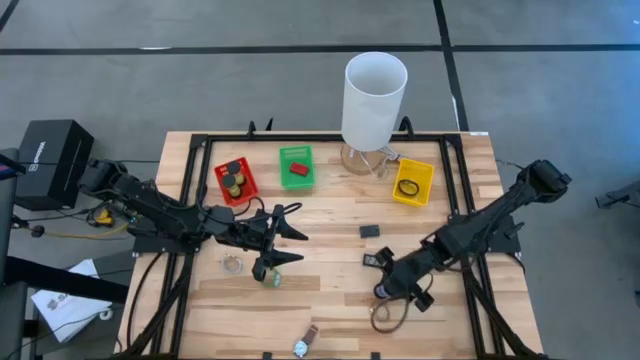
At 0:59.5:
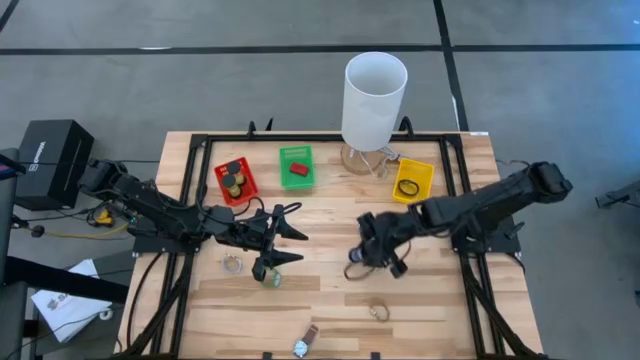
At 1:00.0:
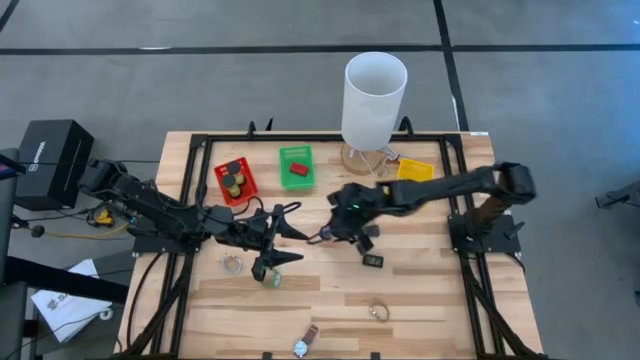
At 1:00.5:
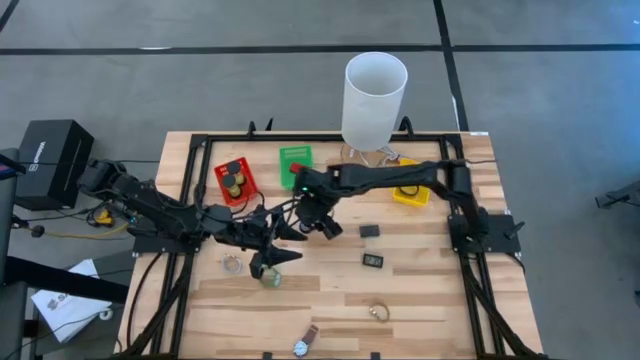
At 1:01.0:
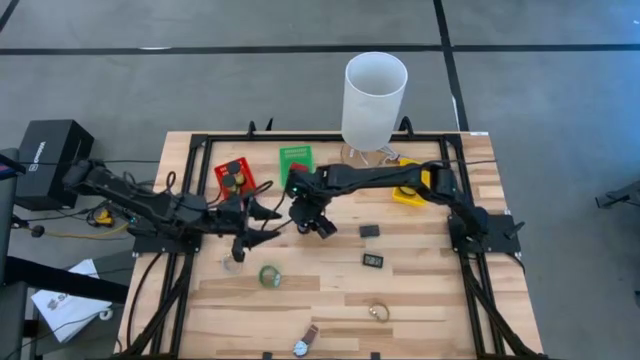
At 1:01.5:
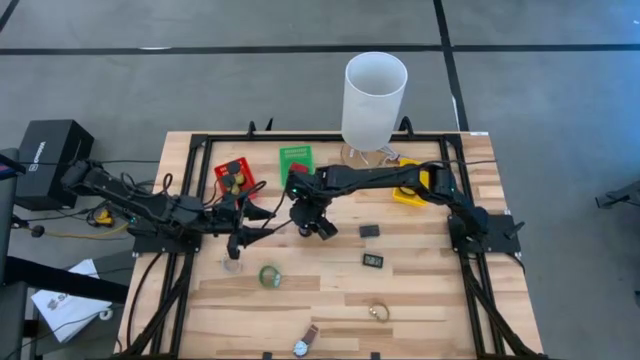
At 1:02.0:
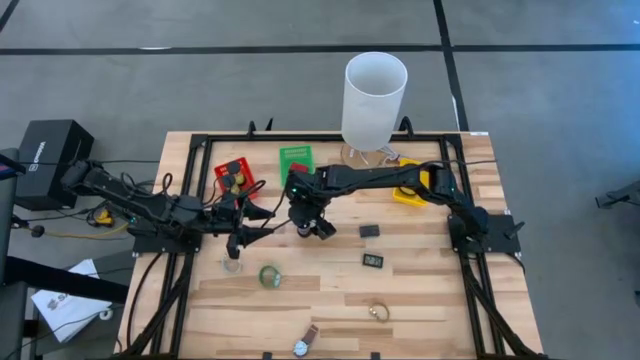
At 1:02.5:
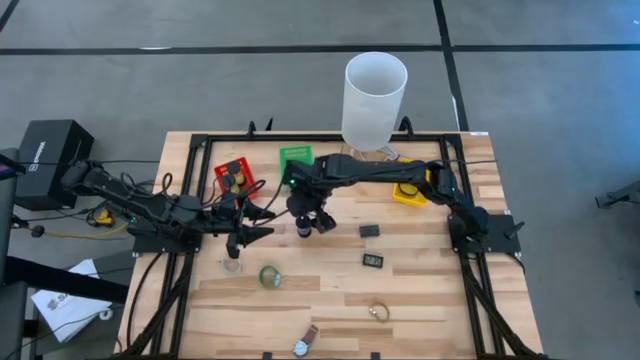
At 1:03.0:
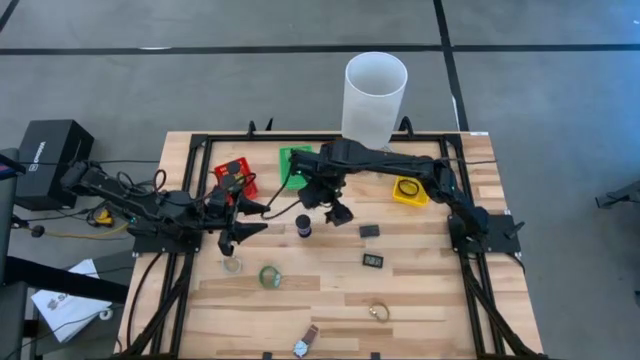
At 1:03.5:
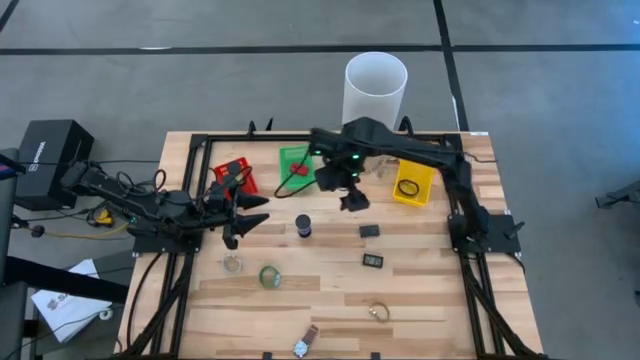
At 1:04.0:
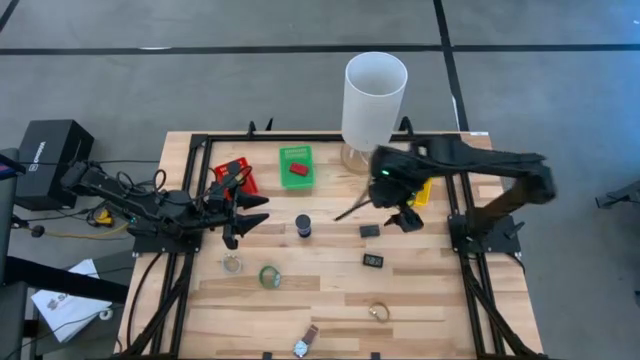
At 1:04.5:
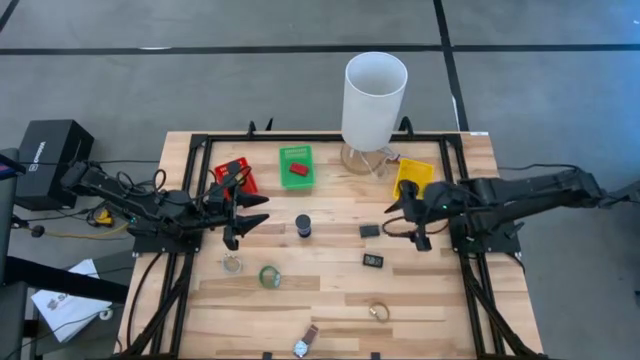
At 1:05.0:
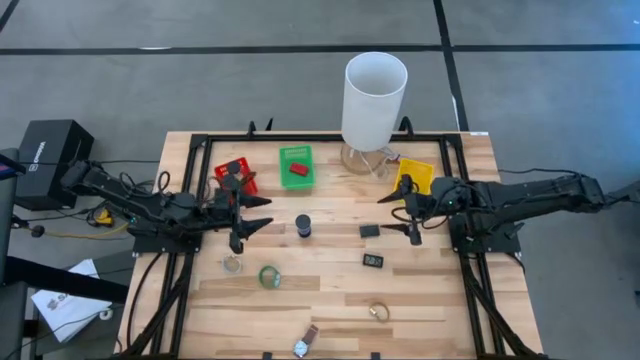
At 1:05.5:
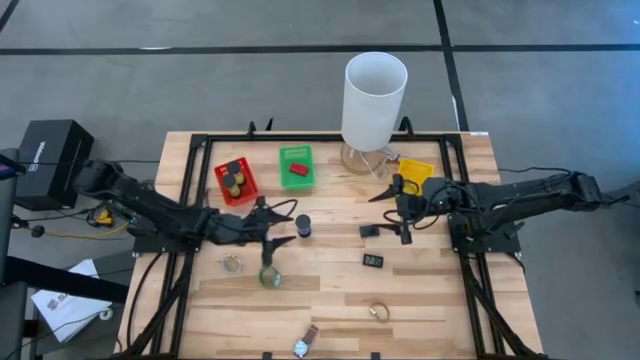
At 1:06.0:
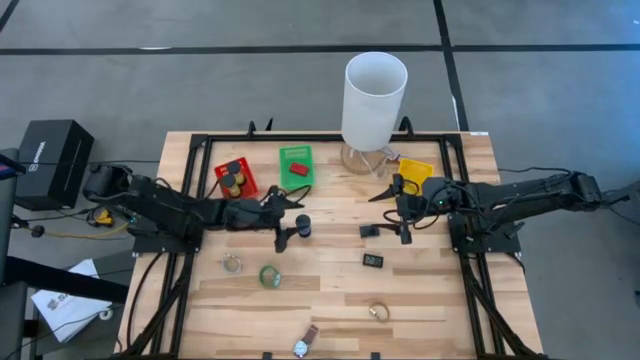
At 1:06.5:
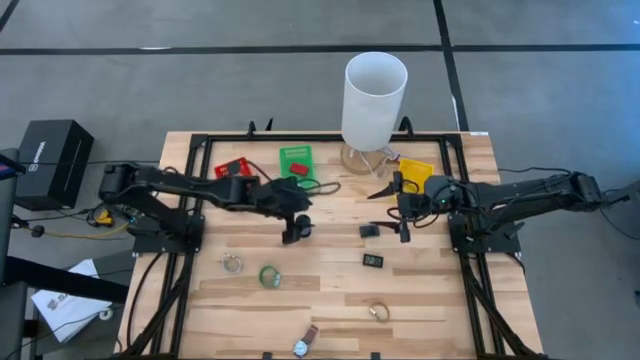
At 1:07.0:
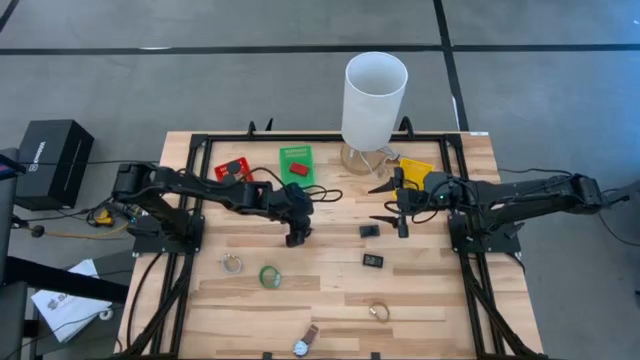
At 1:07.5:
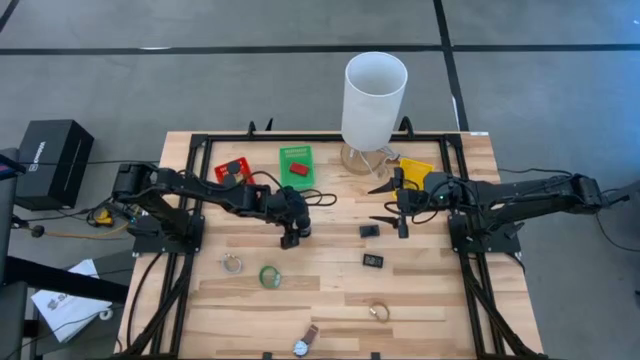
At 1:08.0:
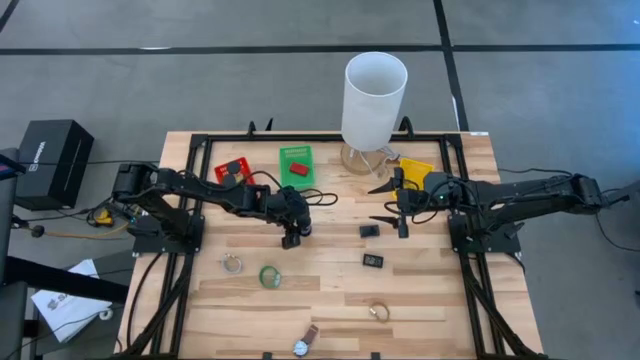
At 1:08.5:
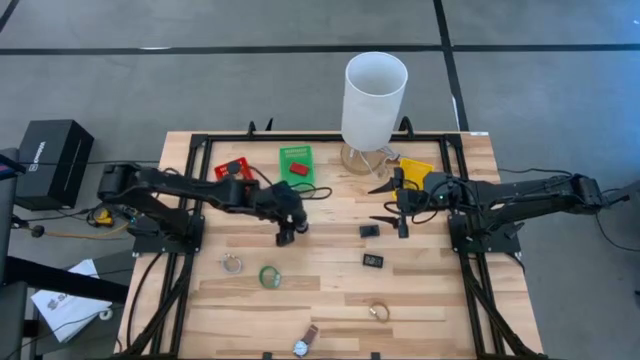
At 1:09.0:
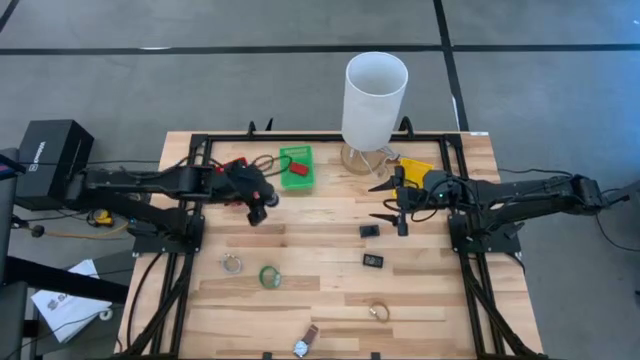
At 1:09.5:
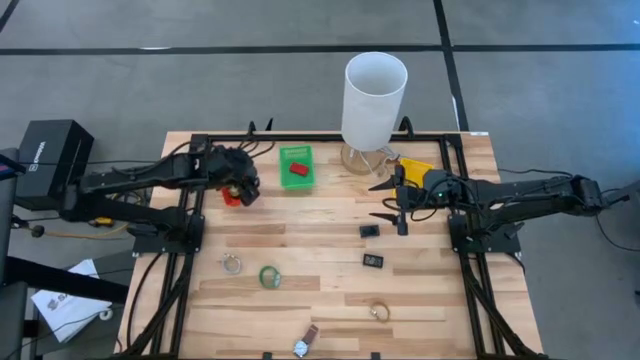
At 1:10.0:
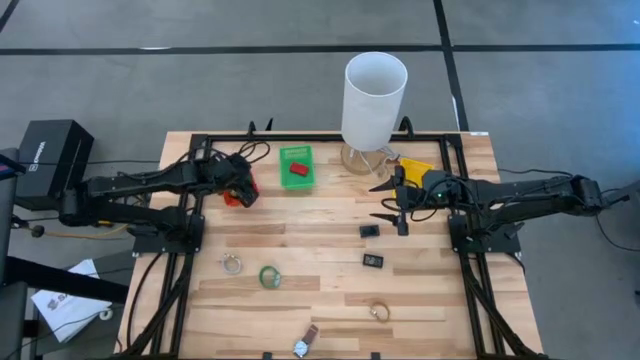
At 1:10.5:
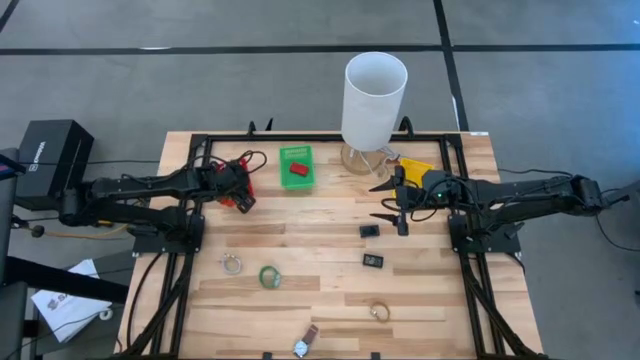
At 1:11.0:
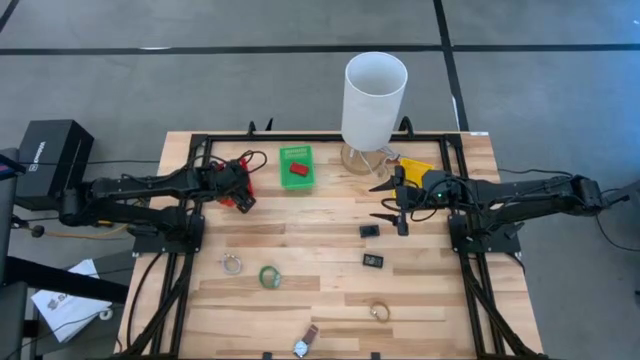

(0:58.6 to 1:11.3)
Task: Pick & Place Office items
Put the blue hourglass into the orange bin

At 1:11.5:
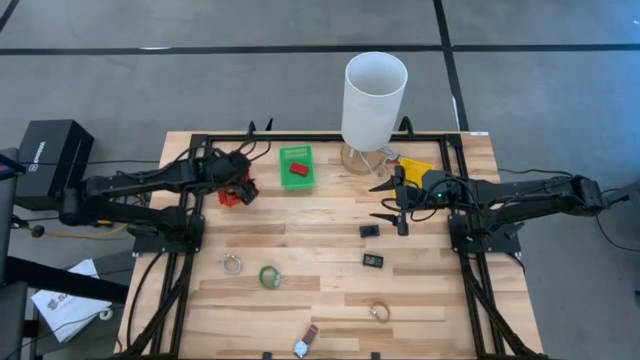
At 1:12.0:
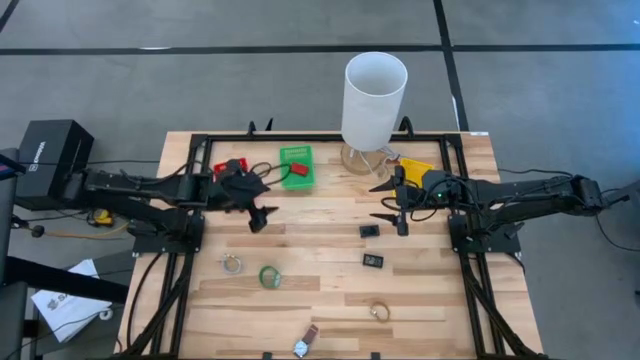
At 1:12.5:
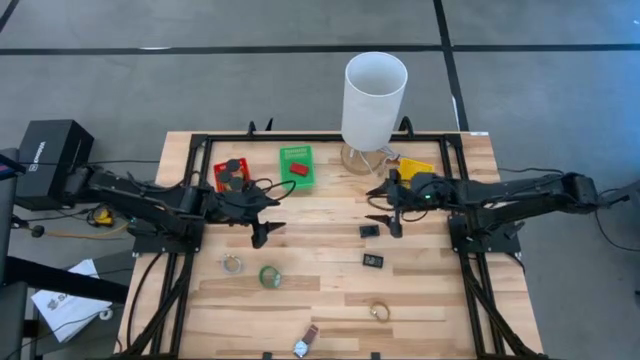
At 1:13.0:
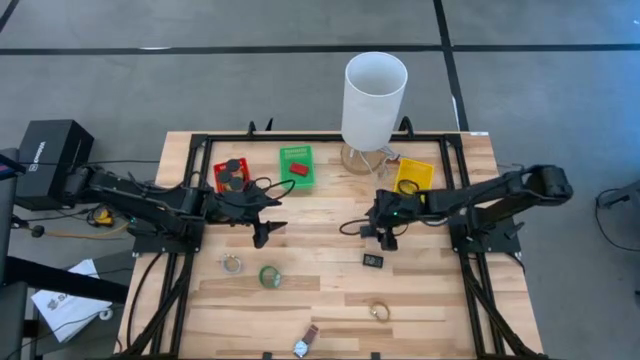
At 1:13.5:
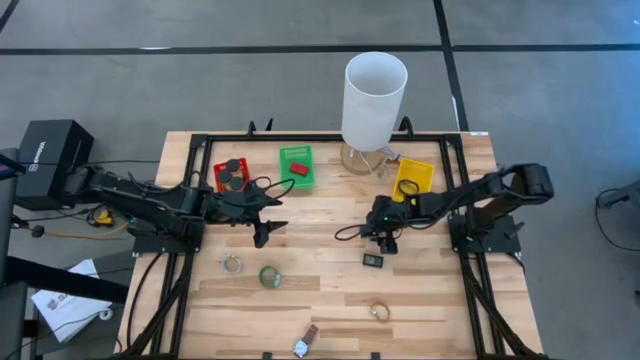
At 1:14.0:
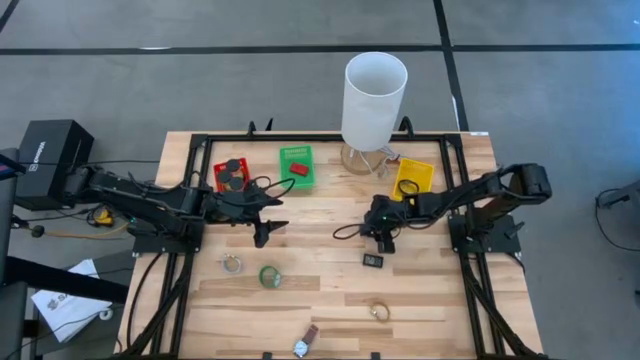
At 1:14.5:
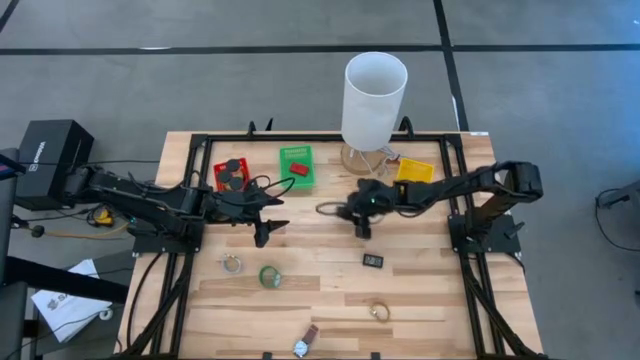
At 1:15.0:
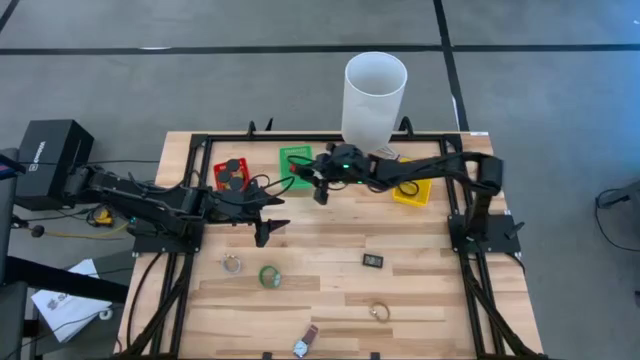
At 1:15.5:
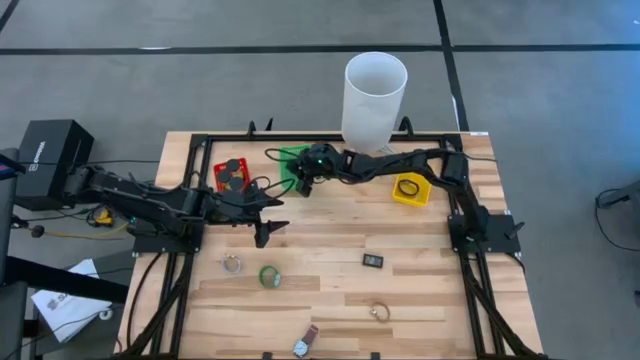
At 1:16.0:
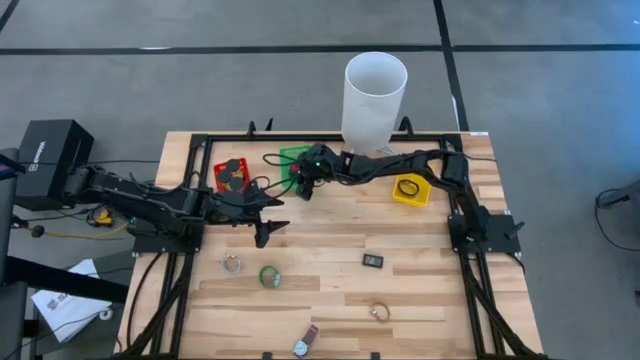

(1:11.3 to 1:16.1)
Put the top black digital clock into the green bin

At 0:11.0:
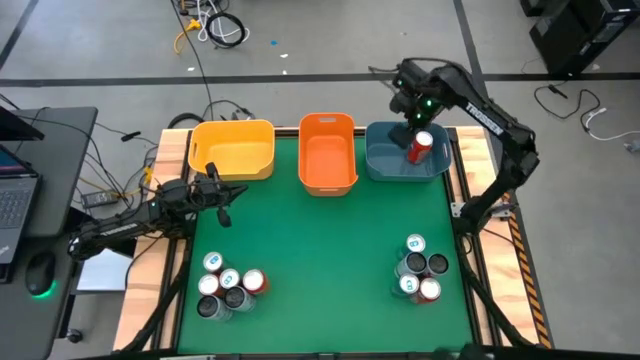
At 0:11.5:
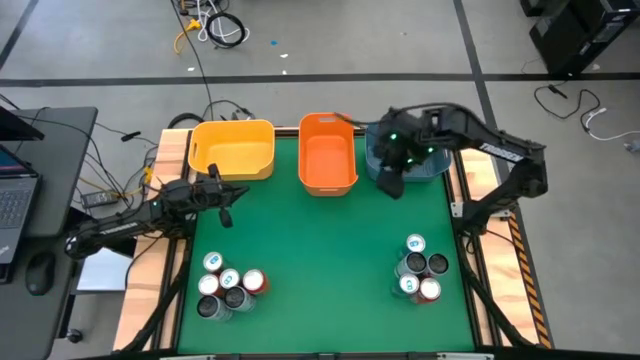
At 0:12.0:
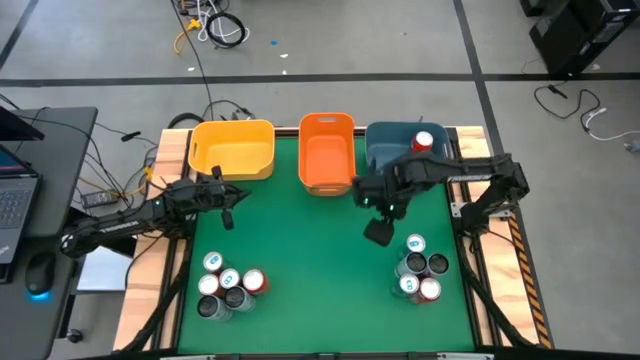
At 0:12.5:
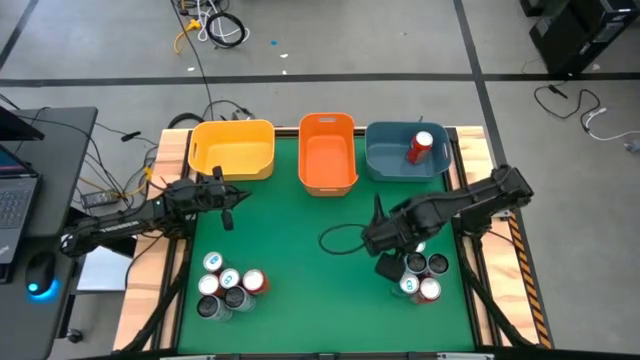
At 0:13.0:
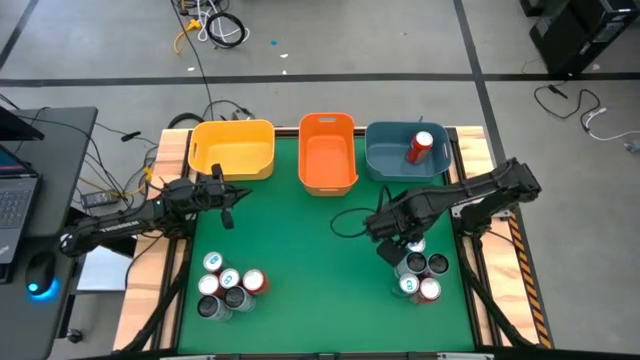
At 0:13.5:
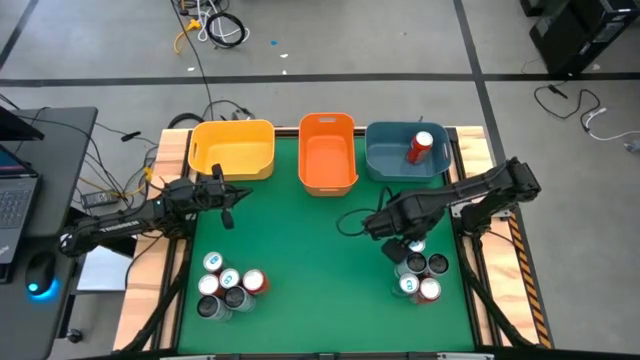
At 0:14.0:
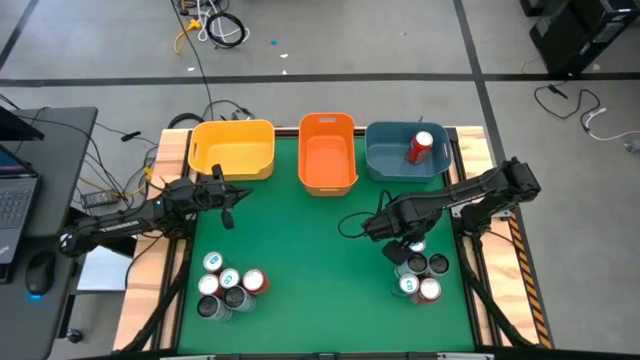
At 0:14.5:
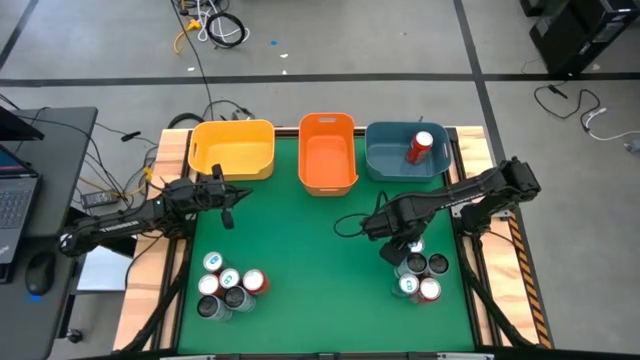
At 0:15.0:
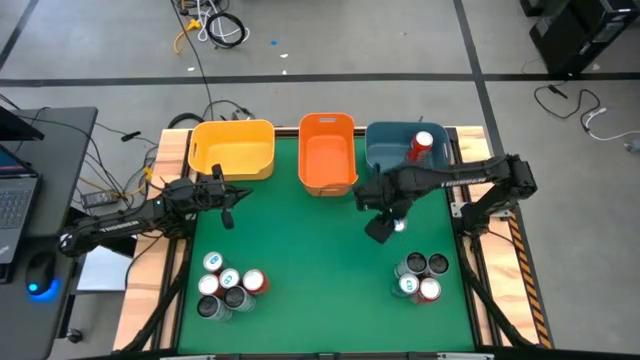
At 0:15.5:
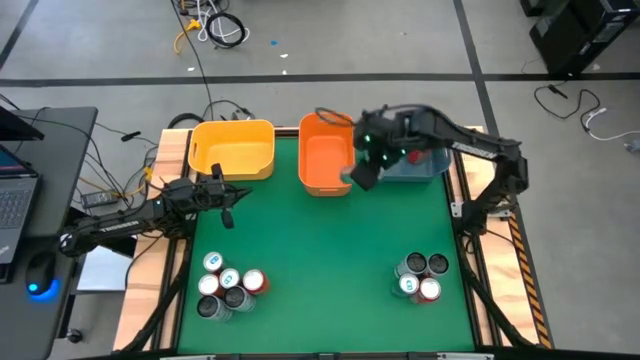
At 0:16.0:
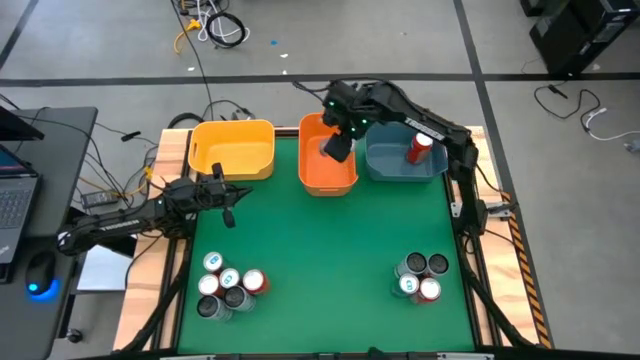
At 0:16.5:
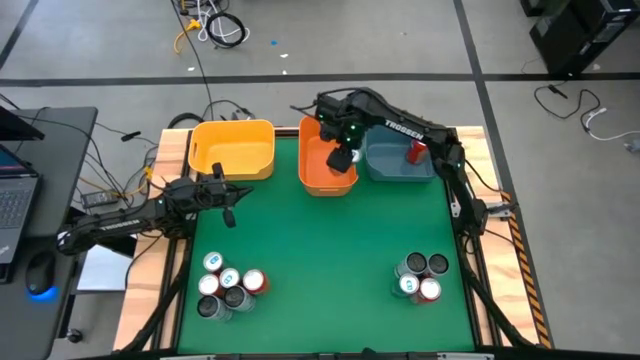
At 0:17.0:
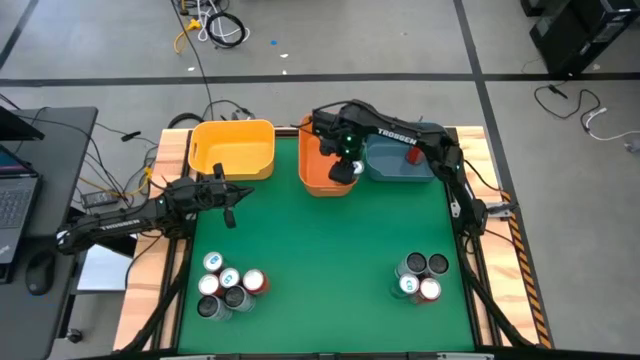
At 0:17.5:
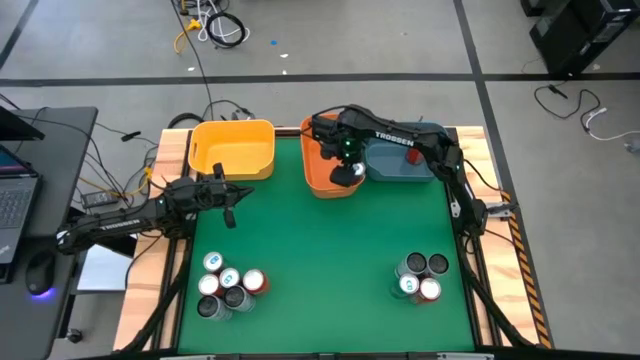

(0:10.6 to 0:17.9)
Task: Sort soda cans
Put the blue soda can into the orange bin
